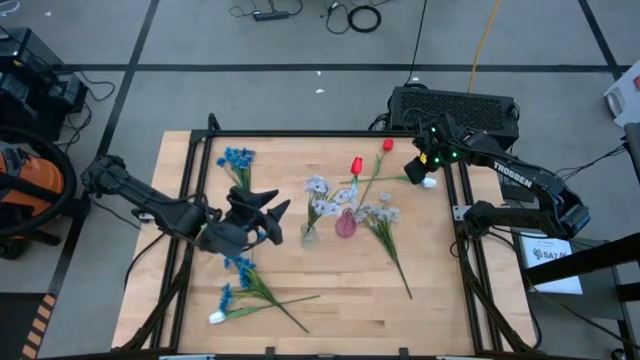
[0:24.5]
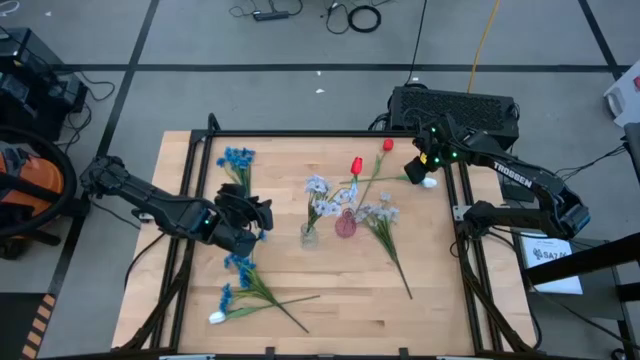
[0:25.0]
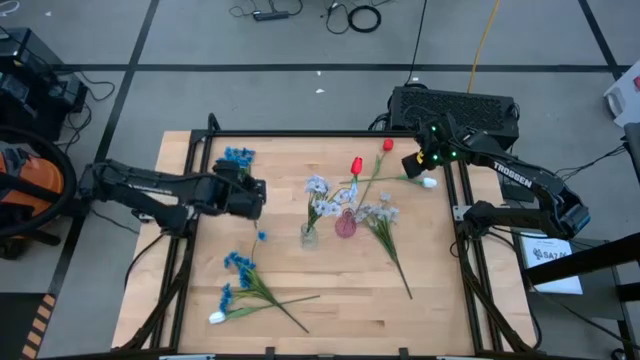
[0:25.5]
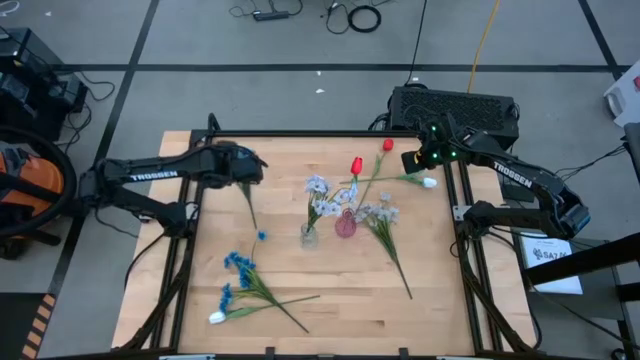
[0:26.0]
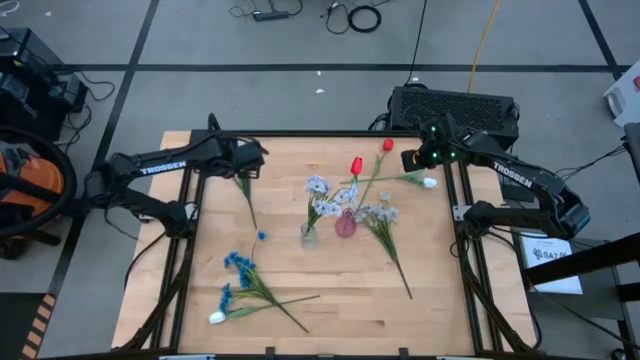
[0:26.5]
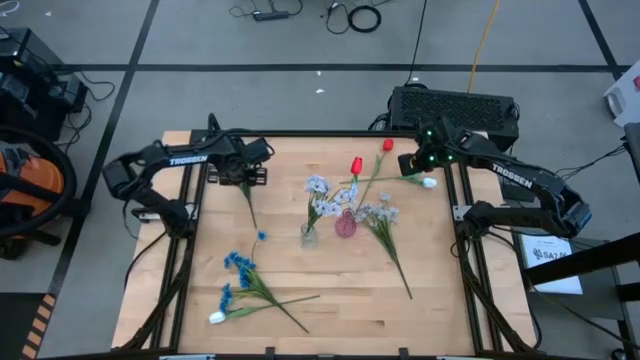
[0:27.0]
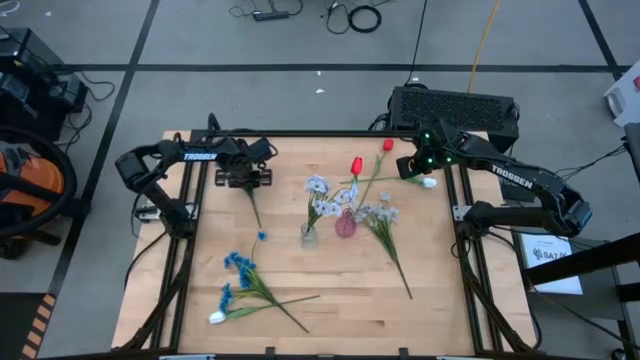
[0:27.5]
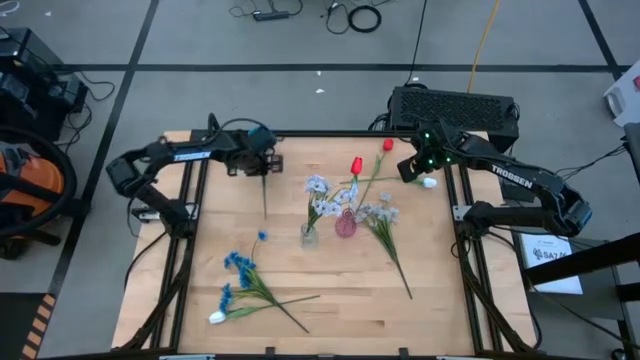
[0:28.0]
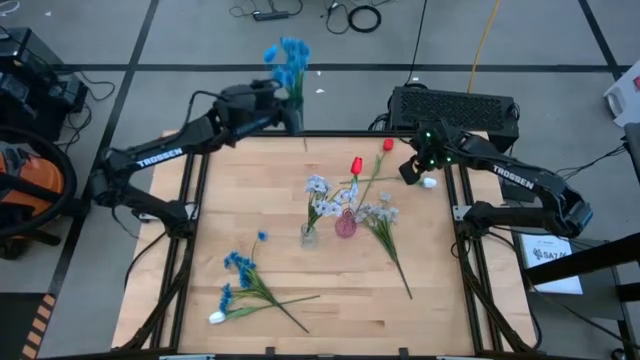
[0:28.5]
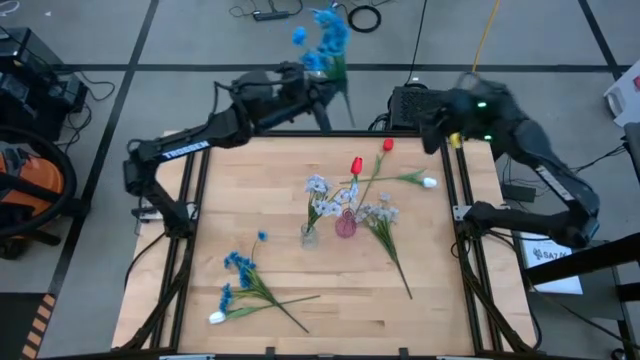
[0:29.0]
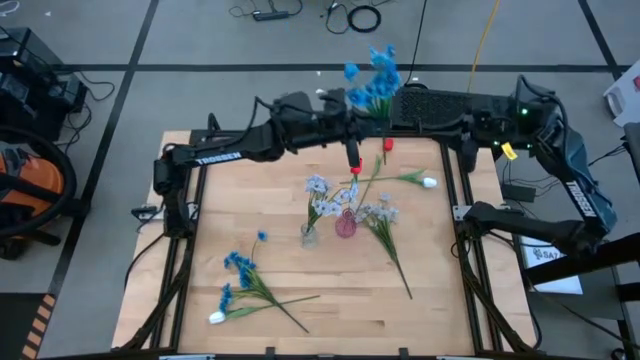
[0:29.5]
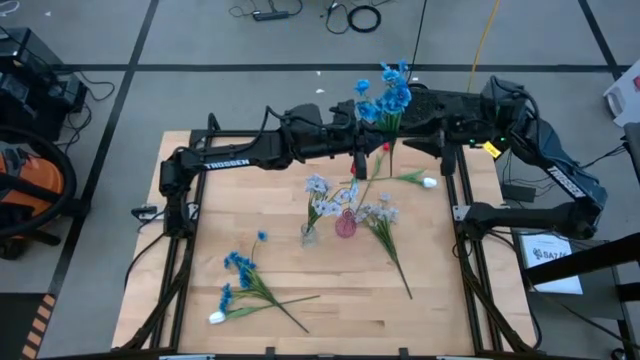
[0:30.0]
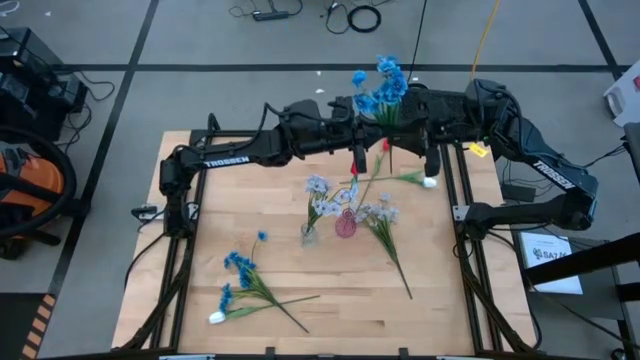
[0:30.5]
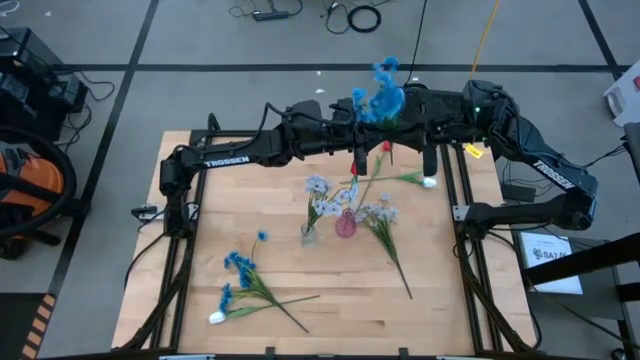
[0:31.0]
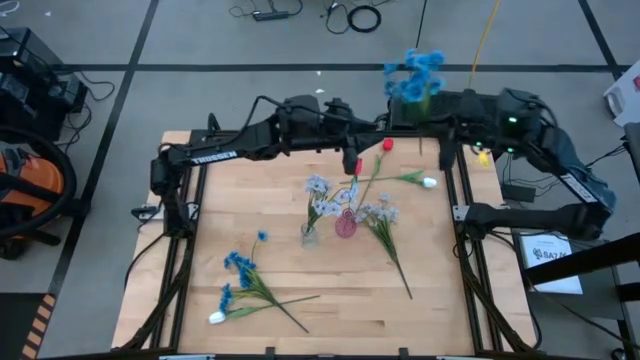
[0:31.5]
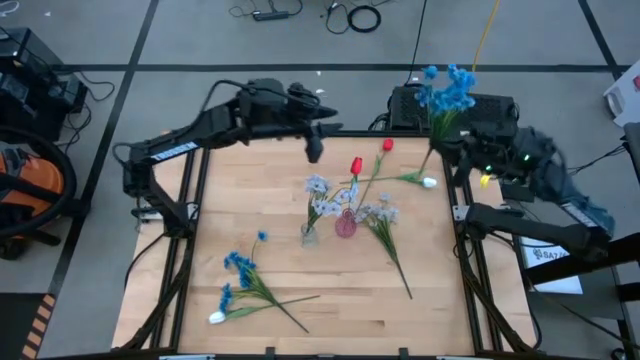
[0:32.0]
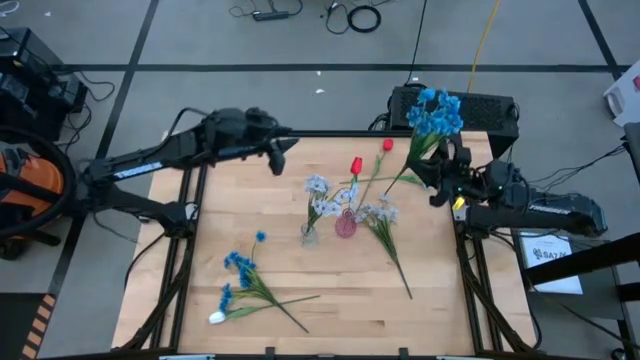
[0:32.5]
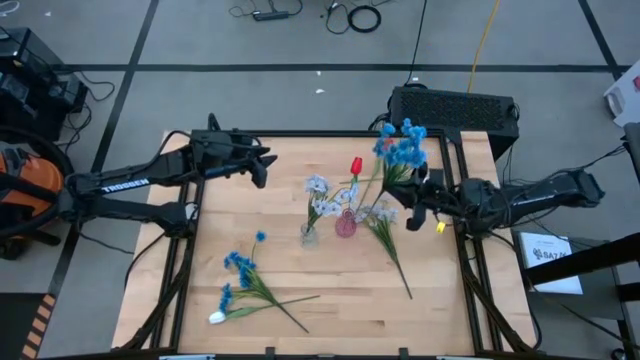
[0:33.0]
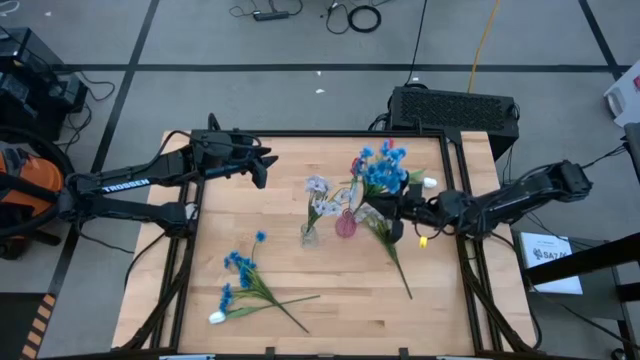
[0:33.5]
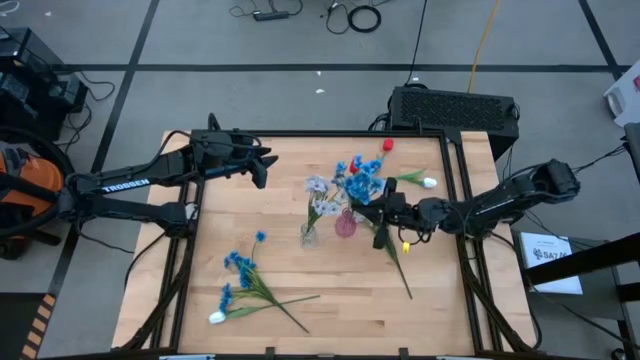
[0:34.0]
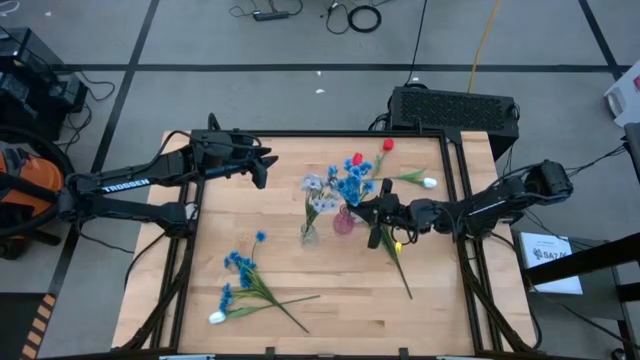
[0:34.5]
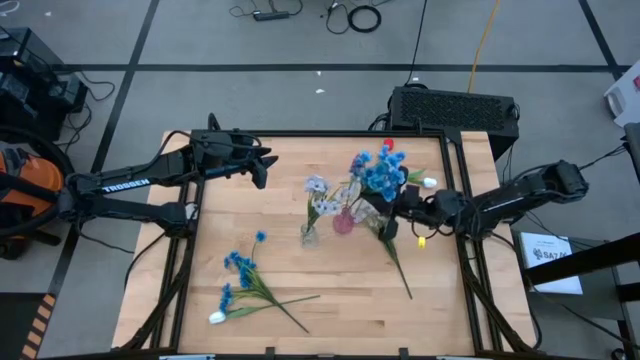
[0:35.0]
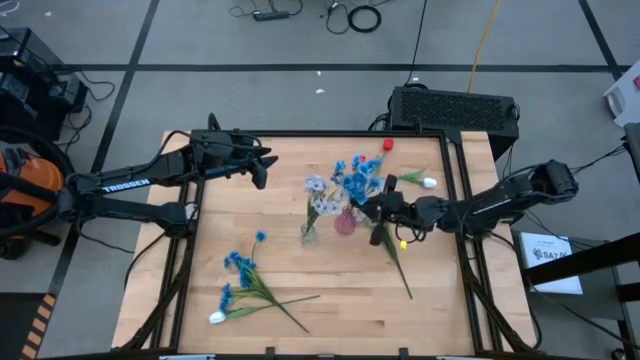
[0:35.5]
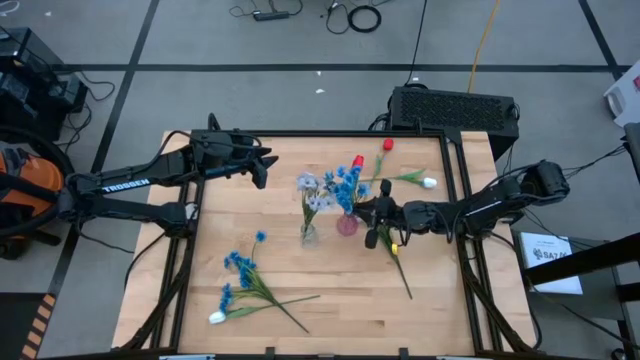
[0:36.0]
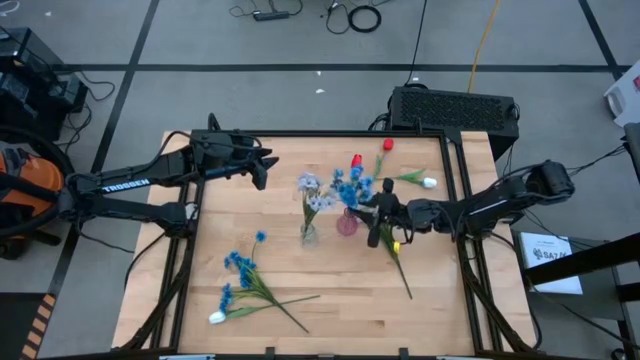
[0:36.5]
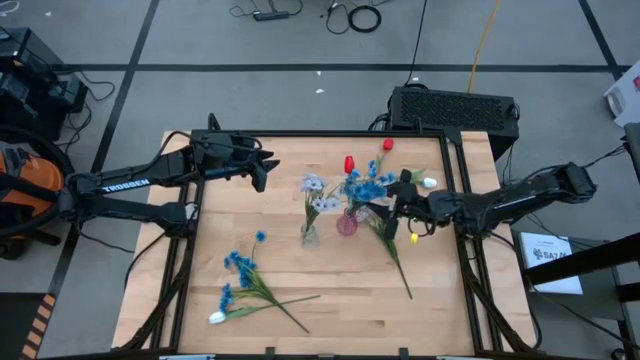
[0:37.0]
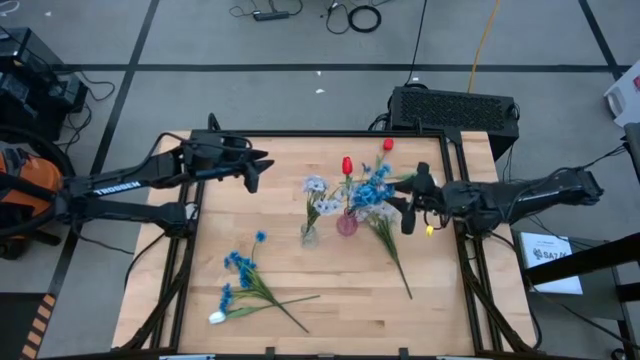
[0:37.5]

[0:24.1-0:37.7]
Task: Sort flowers into vase by color
Put the top blue flowers into the pink vase

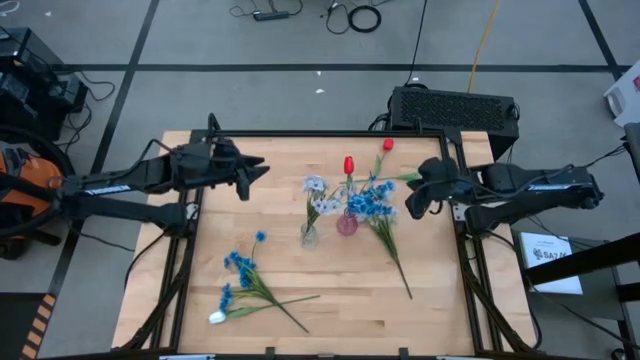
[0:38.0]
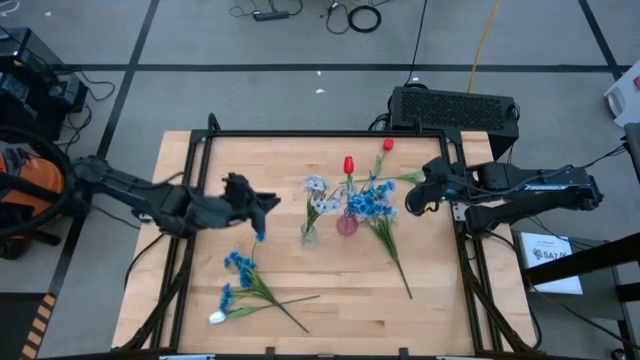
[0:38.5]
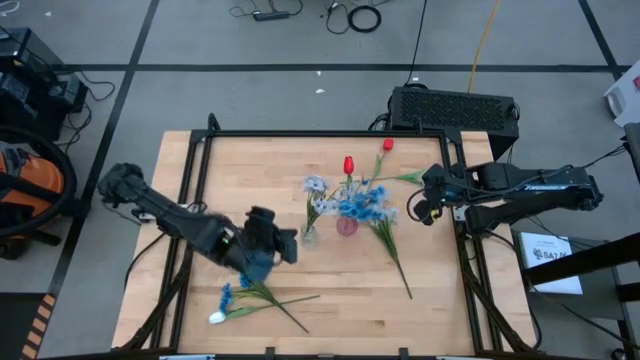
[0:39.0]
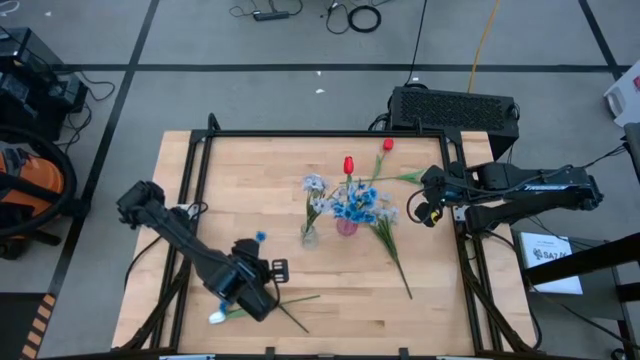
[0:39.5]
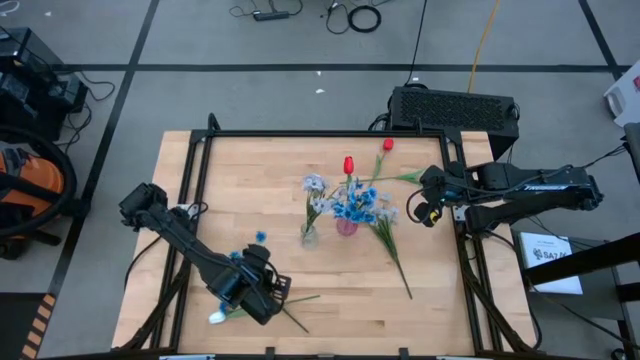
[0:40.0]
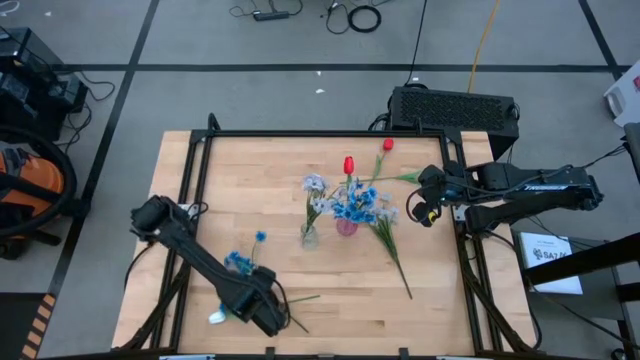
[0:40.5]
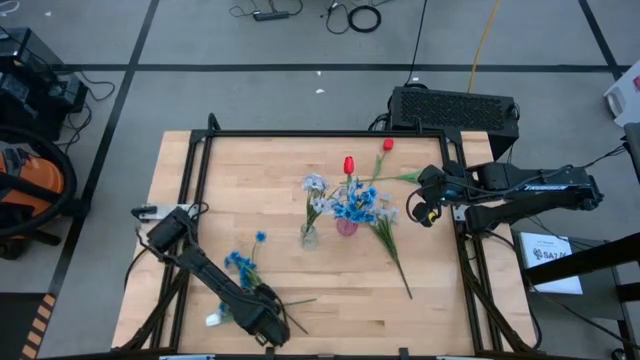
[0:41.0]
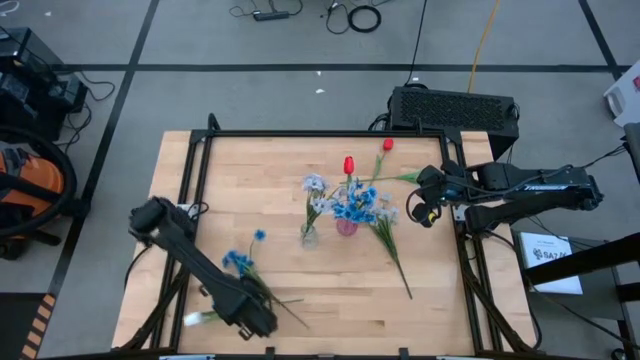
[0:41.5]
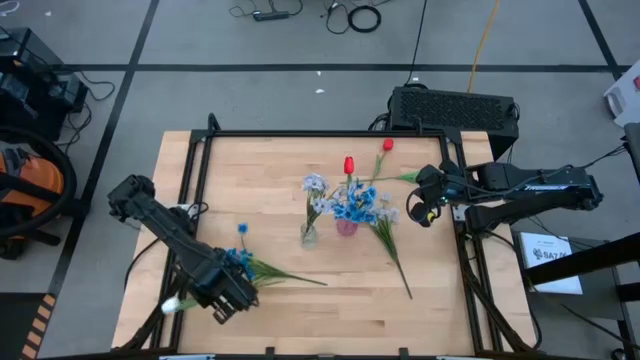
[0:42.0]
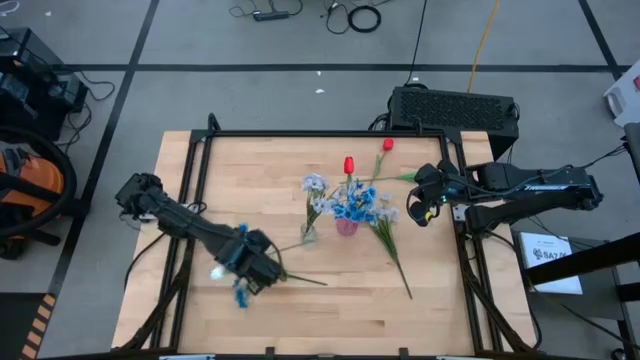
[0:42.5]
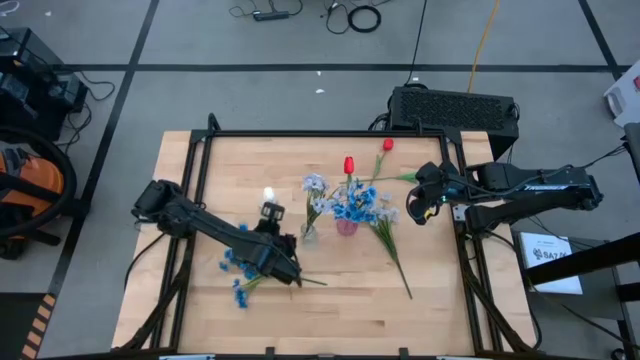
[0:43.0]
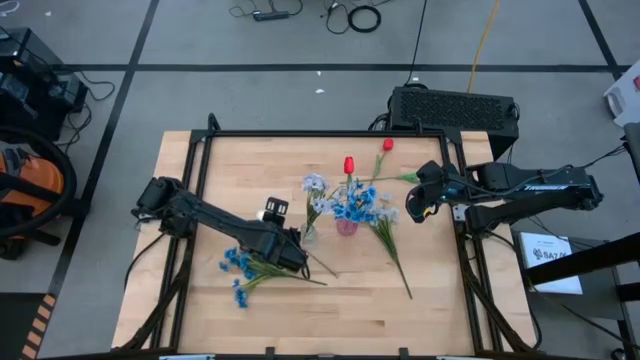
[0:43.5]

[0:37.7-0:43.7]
Put the bottom white flower into the transparent vase

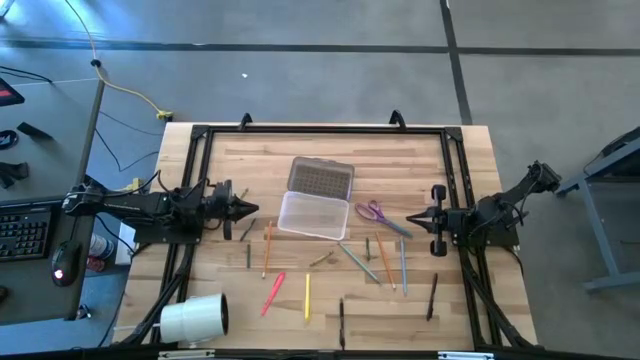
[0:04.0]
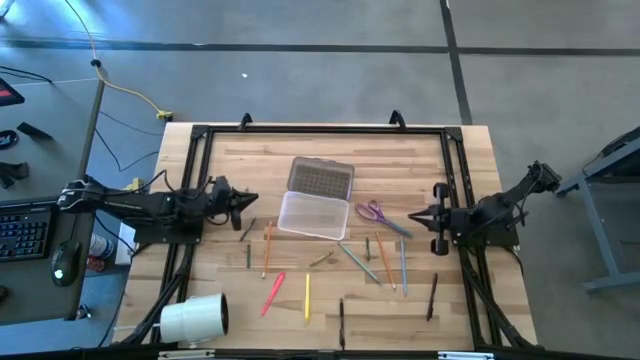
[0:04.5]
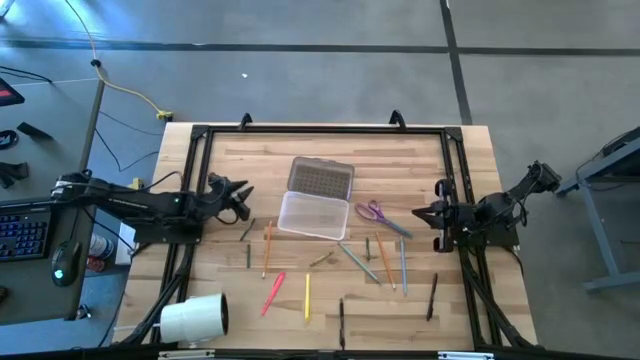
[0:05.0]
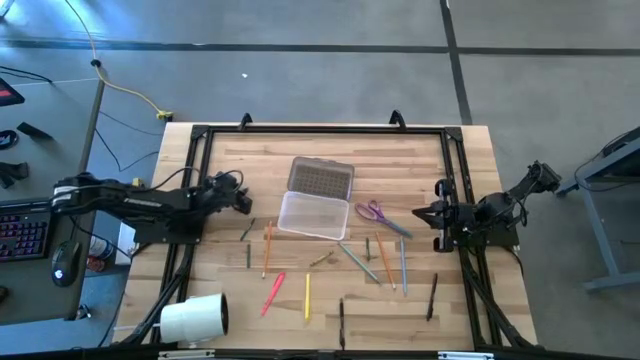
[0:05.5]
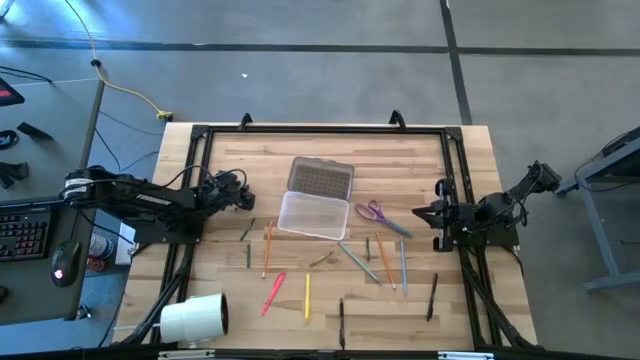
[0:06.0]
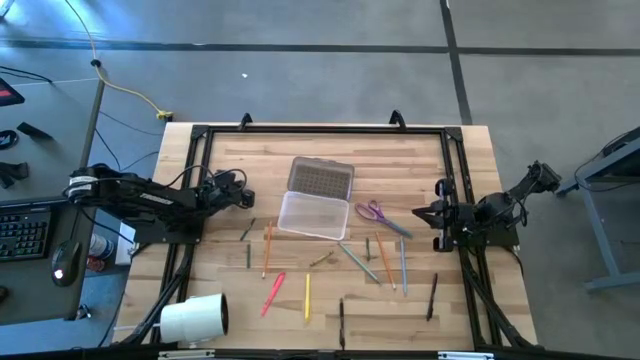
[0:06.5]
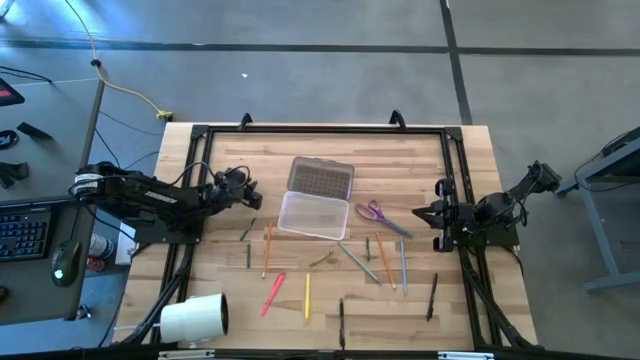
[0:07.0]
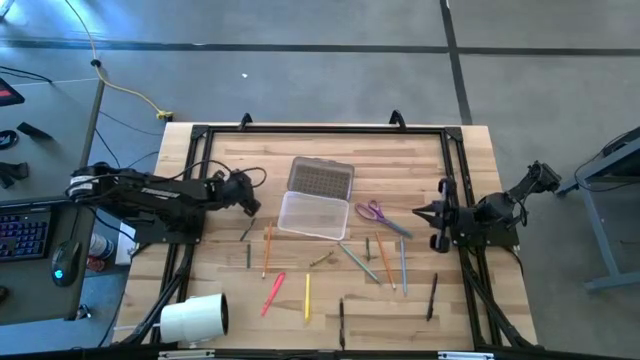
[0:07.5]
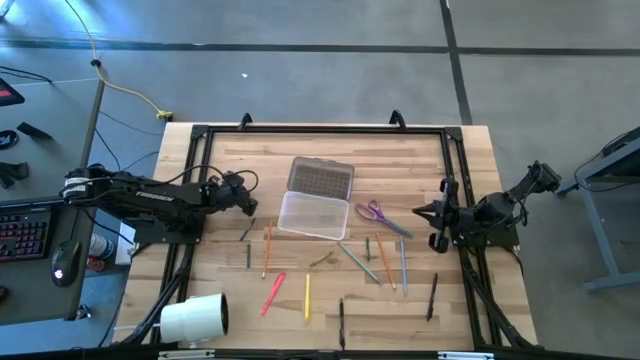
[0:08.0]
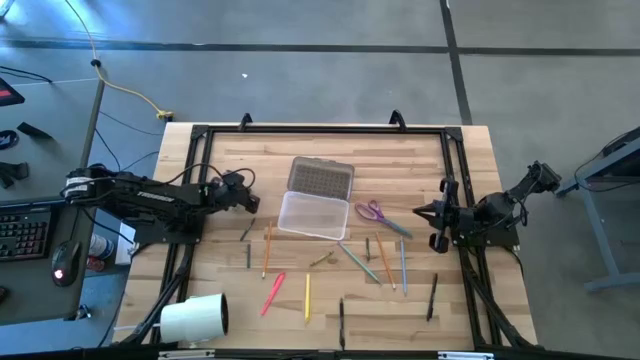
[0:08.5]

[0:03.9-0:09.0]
Task: Pick & place school supplies into a supply box
Put the yellow crayon into the black supply box
